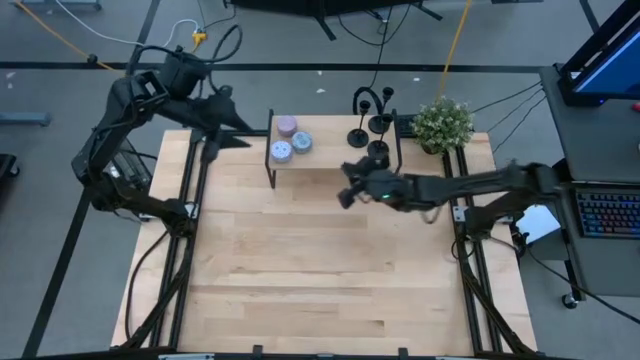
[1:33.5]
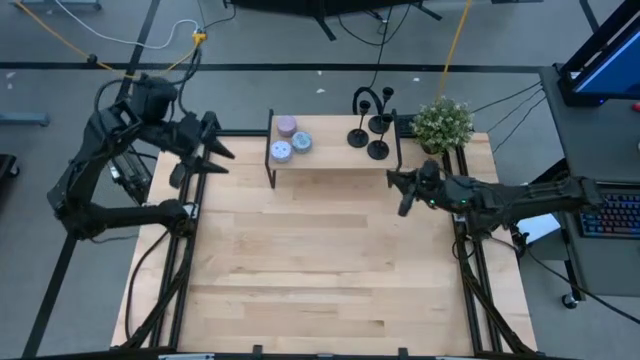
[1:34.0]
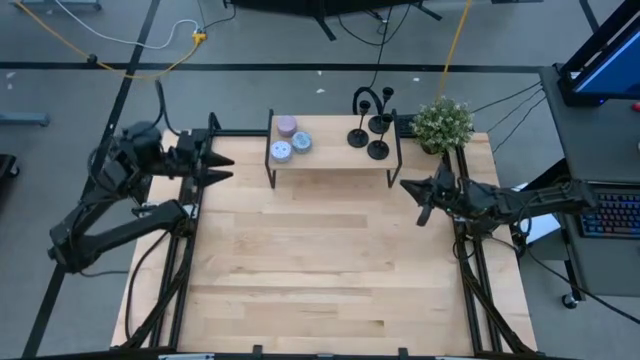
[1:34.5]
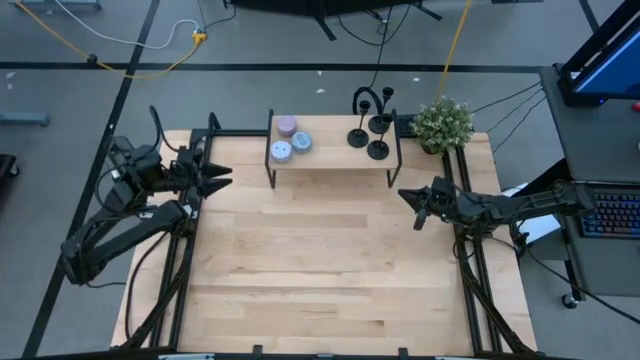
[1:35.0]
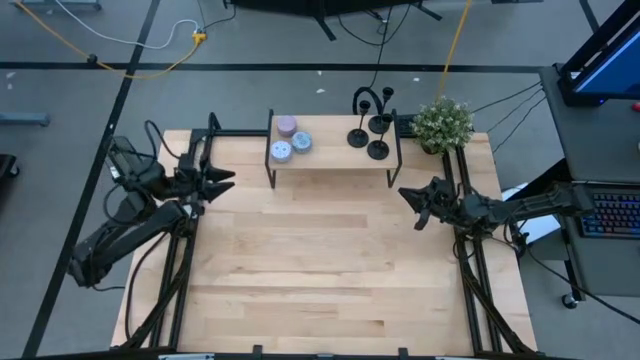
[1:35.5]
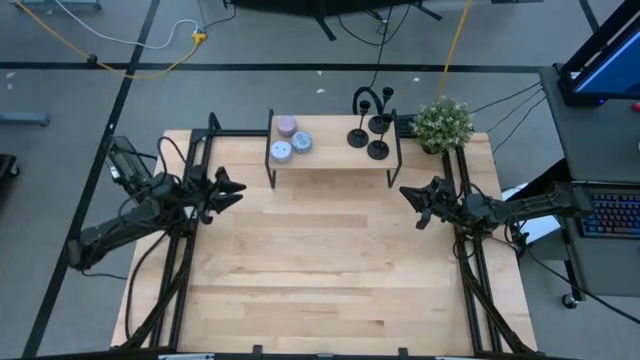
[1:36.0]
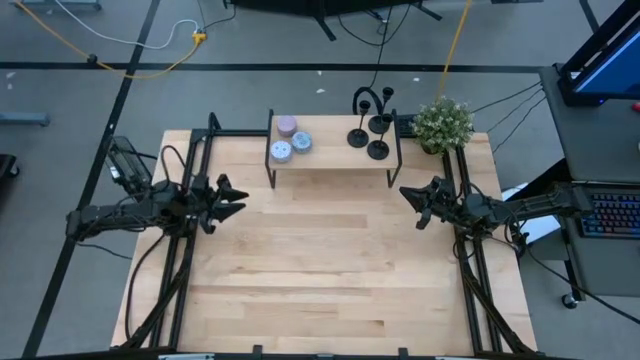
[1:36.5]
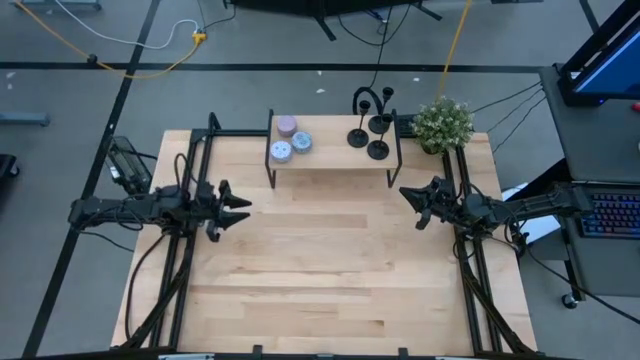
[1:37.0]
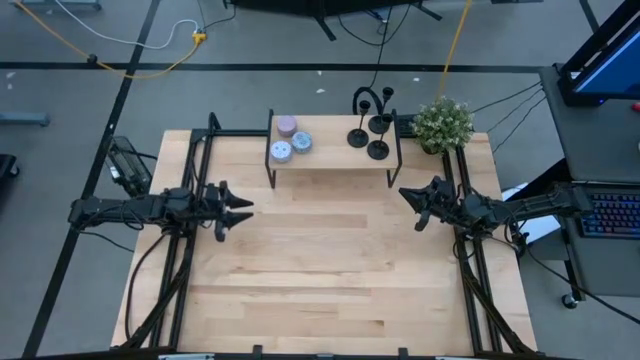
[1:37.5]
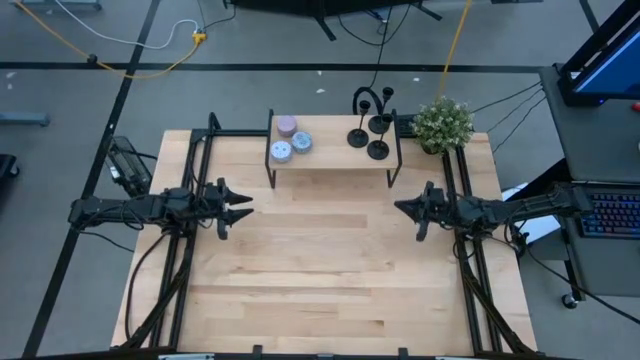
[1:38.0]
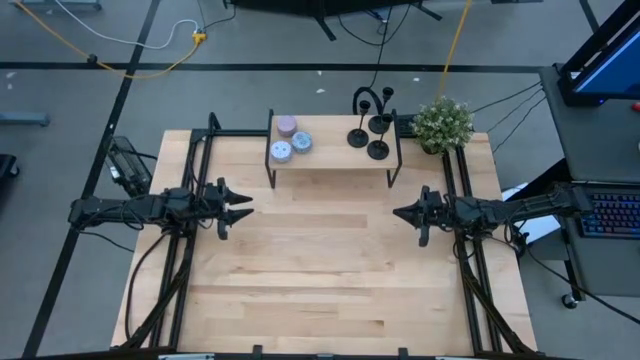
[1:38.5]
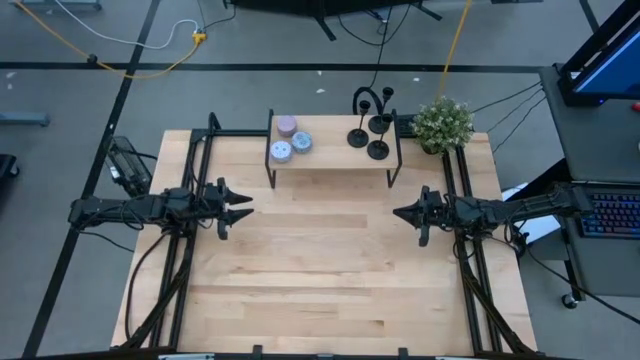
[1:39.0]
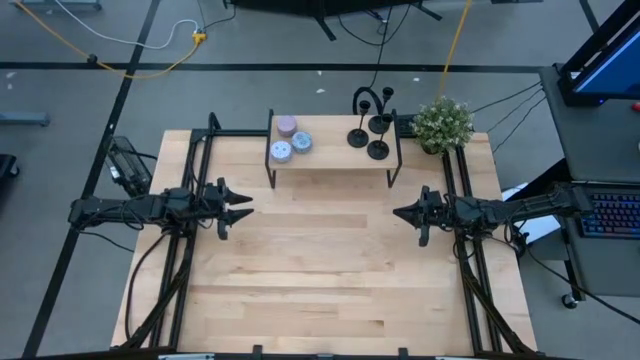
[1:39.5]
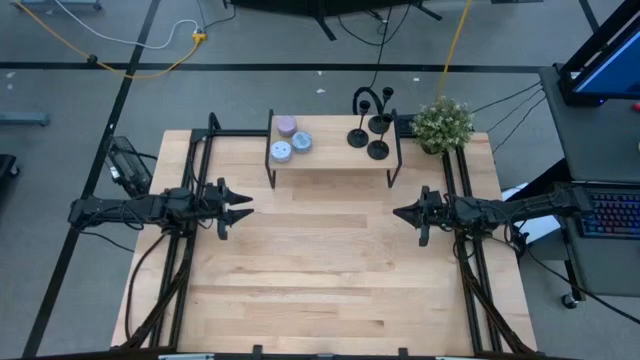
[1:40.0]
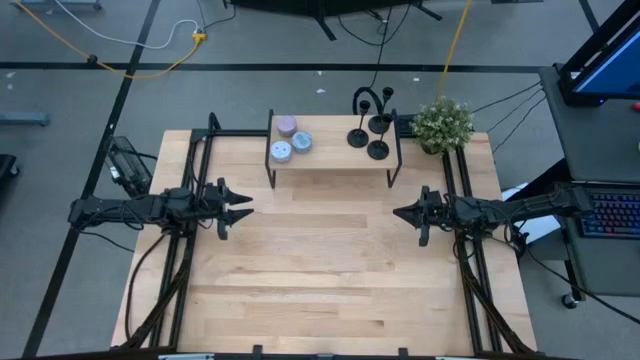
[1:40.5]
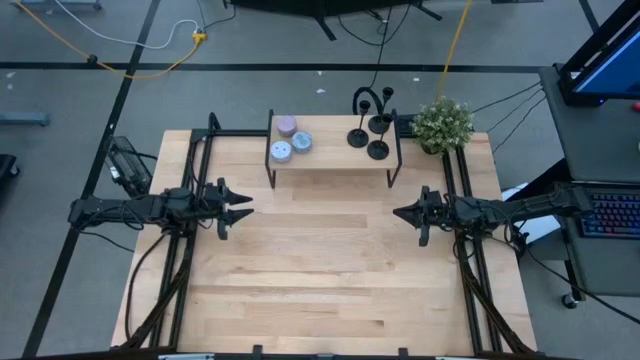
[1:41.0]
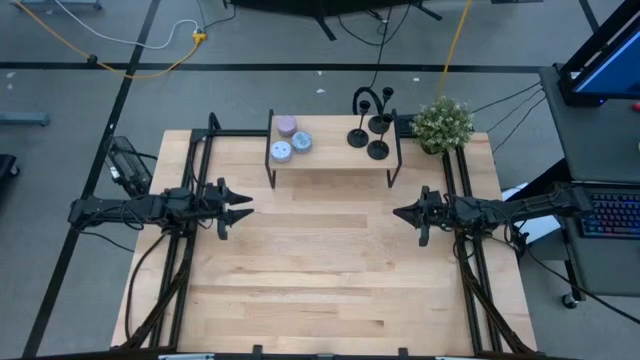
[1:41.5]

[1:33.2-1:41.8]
Task: Pick & Place candle stick holders
Return to Home Position

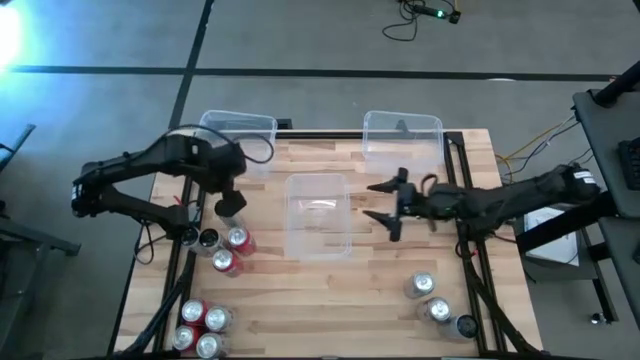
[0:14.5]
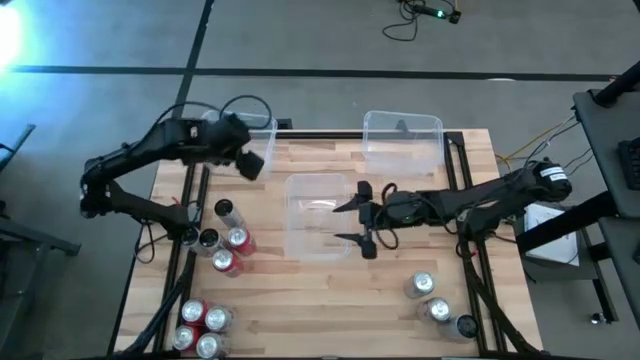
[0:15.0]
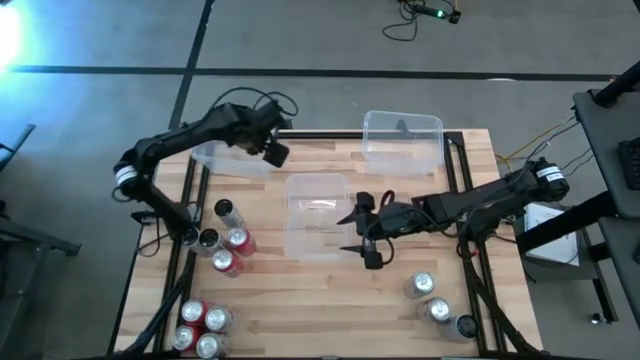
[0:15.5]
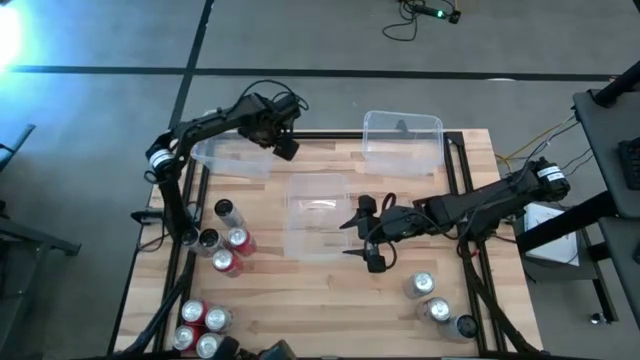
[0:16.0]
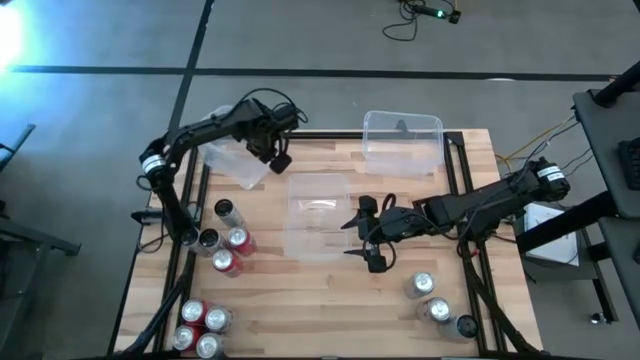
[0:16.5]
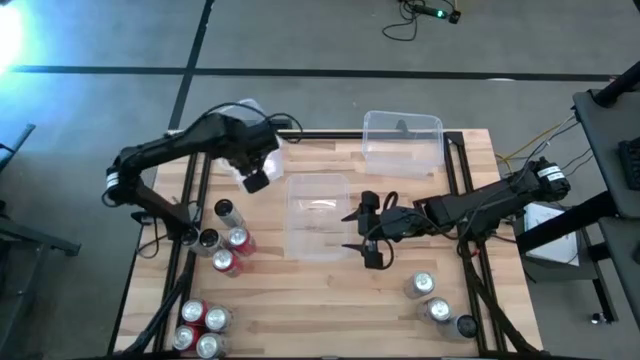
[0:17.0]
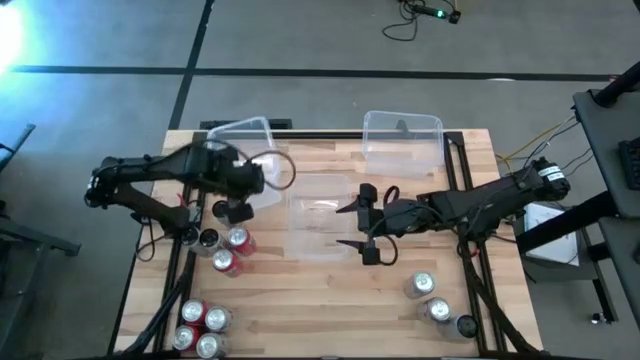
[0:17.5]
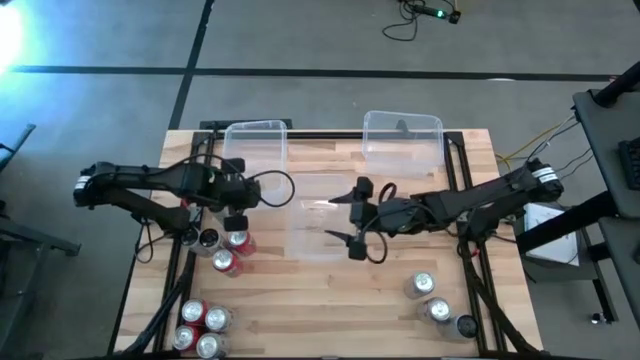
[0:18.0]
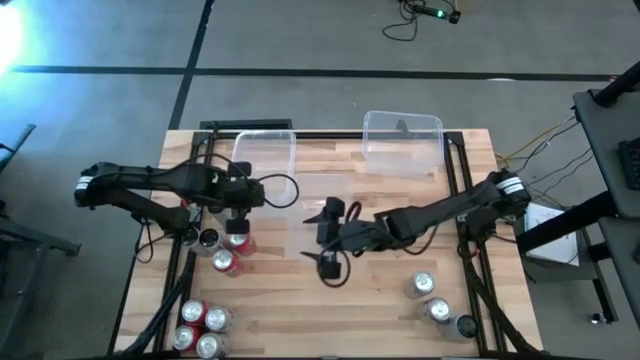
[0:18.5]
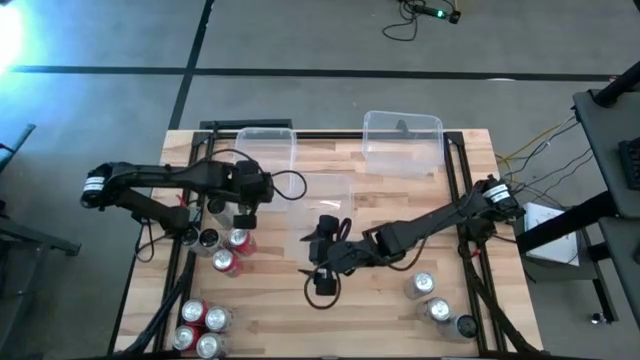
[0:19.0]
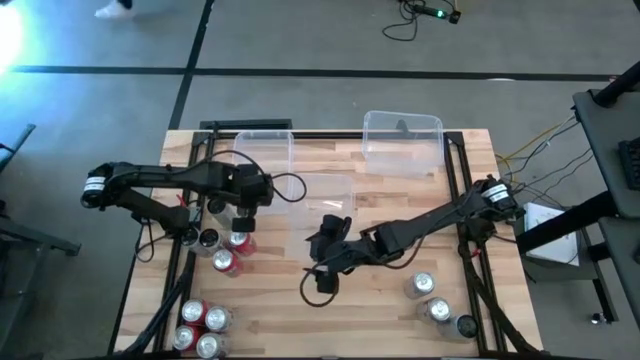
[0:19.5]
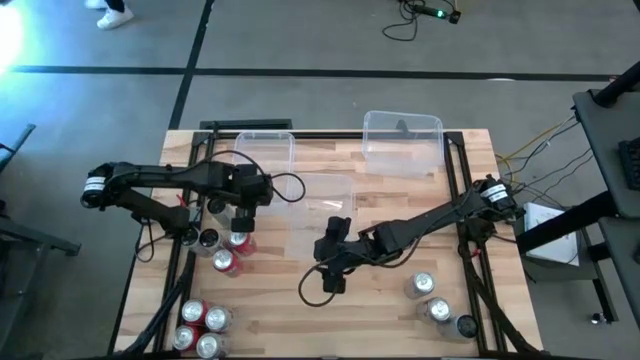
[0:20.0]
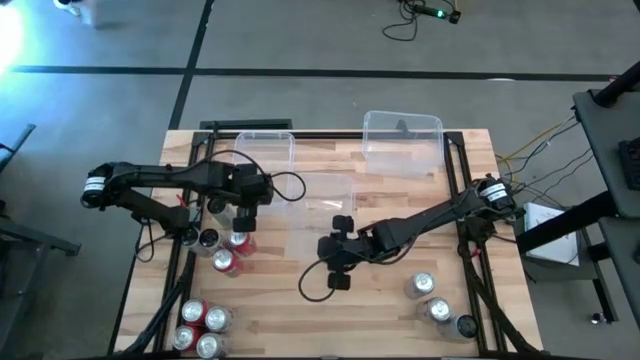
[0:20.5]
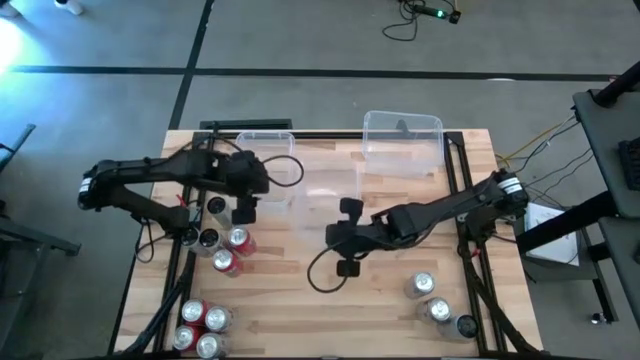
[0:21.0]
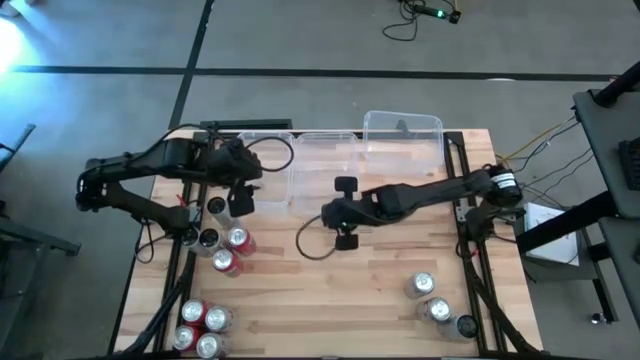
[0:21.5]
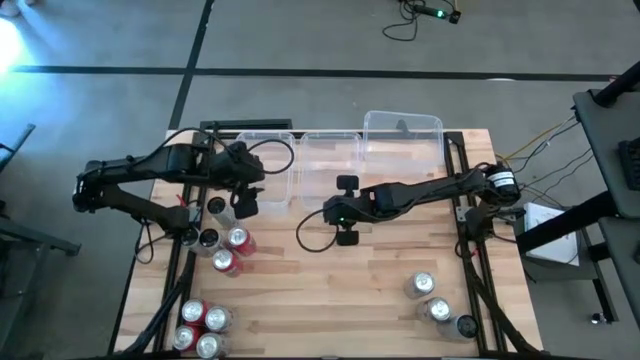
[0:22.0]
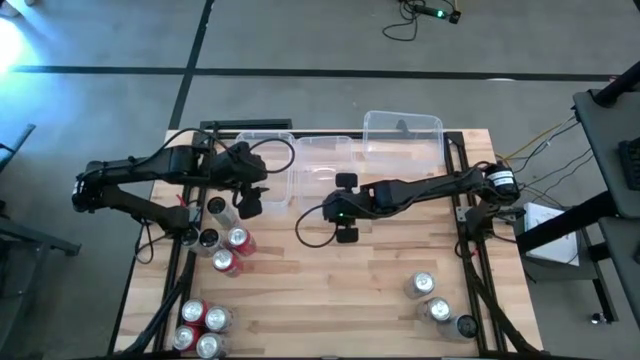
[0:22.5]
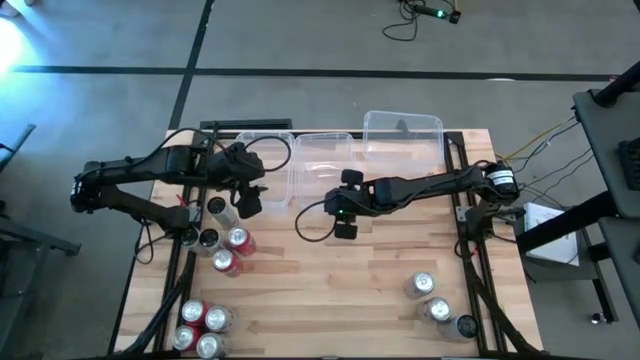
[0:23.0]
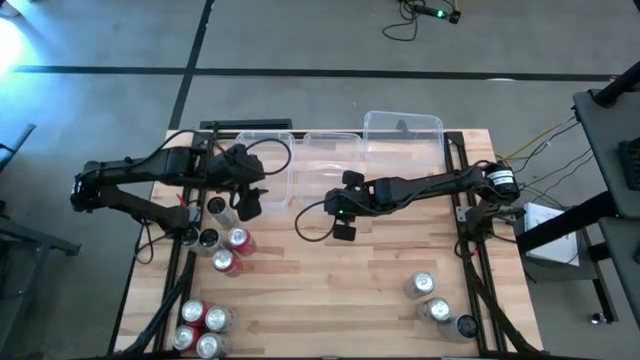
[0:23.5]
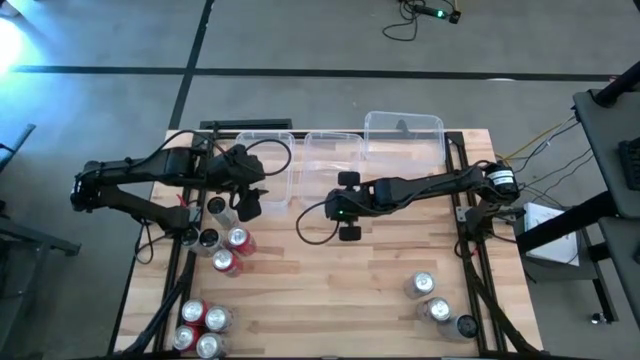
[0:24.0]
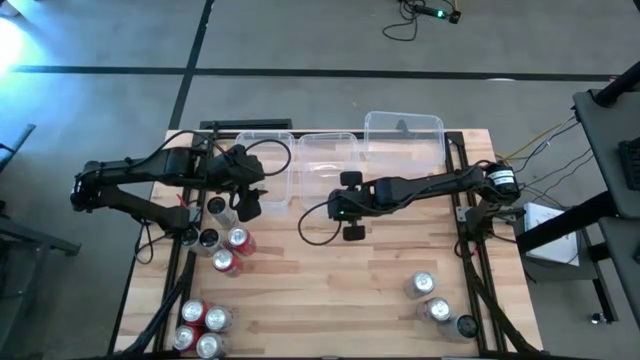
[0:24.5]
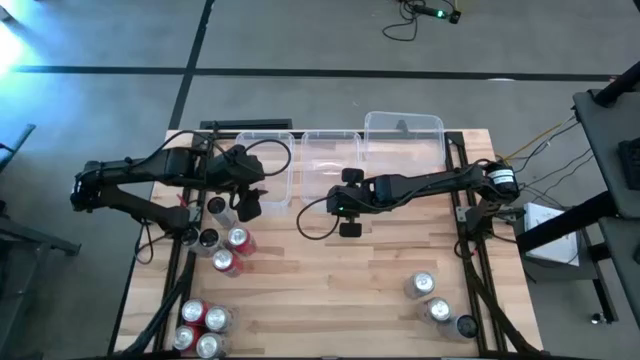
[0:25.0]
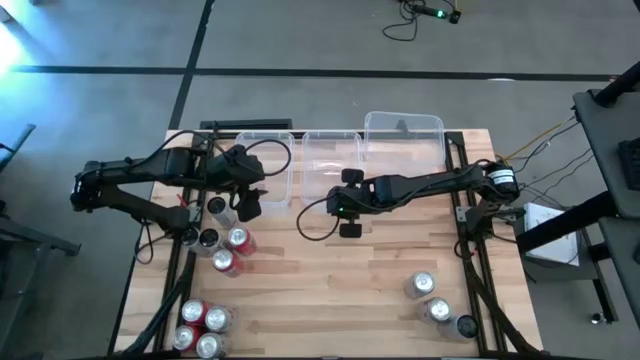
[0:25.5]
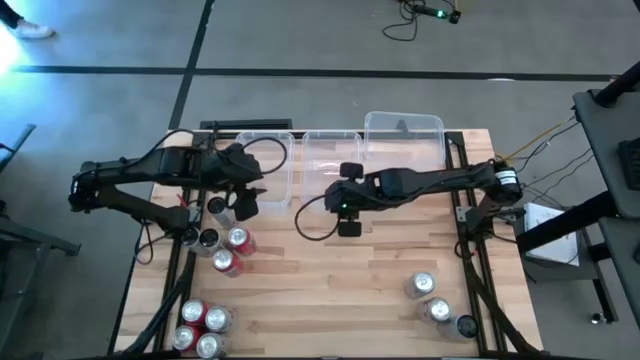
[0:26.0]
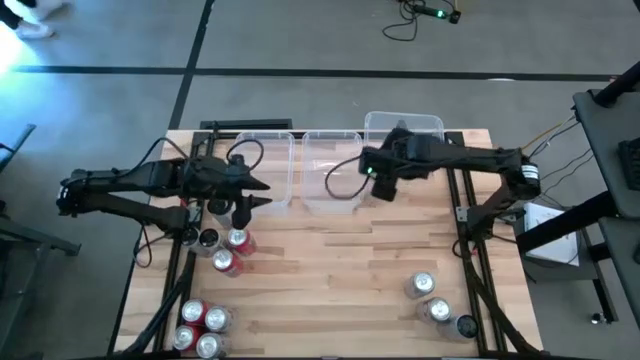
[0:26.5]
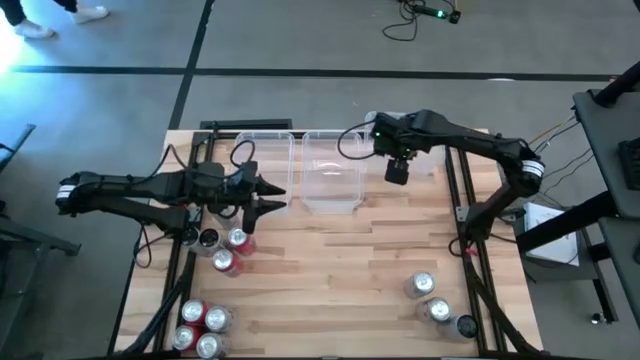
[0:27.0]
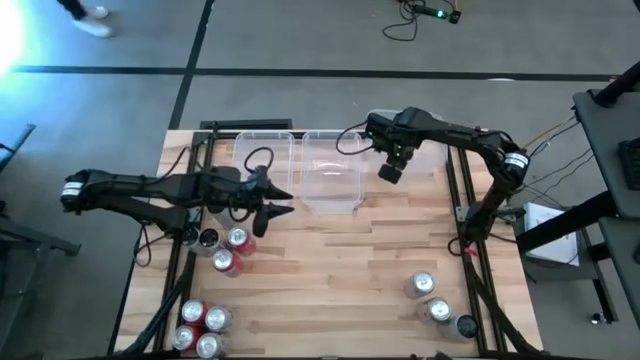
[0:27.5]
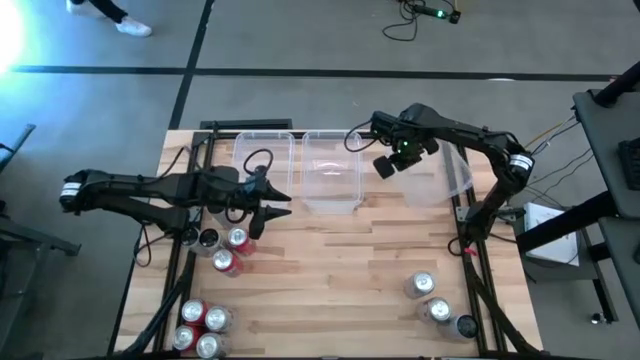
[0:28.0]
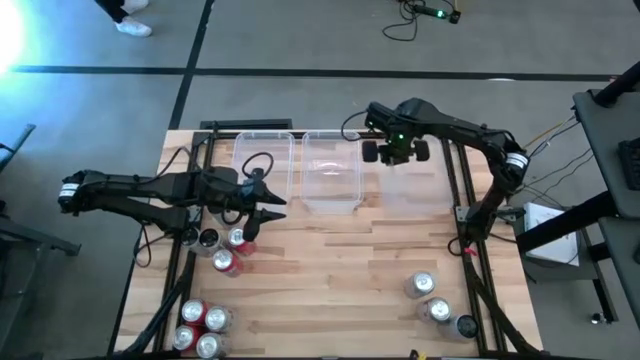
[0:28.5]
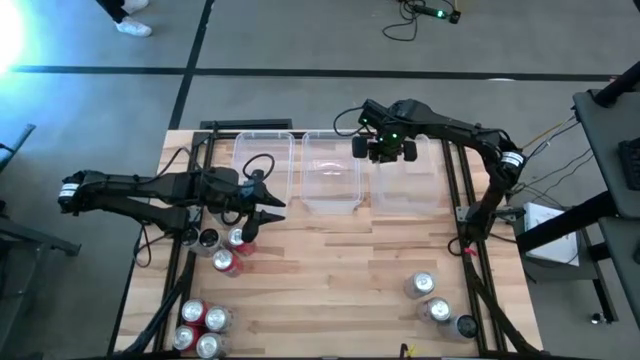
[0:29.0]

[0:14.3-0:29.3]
Task: Sort soda cans
Adjust the transparent bins
